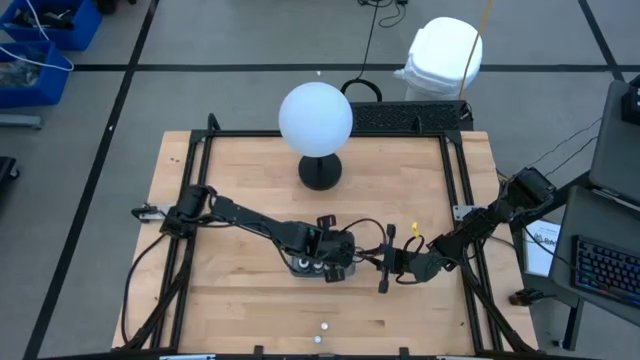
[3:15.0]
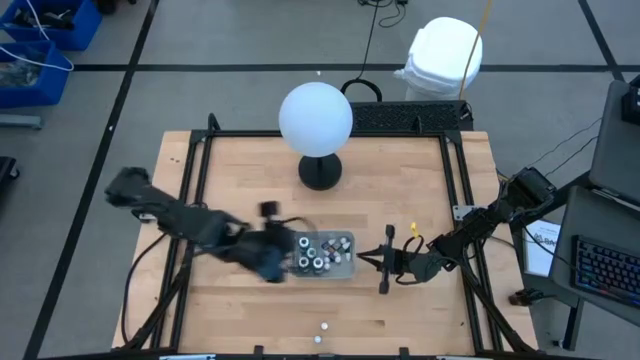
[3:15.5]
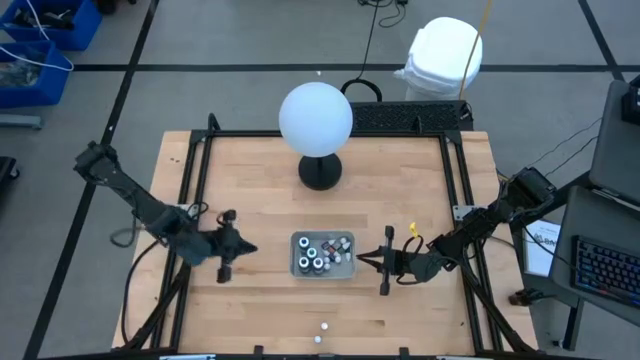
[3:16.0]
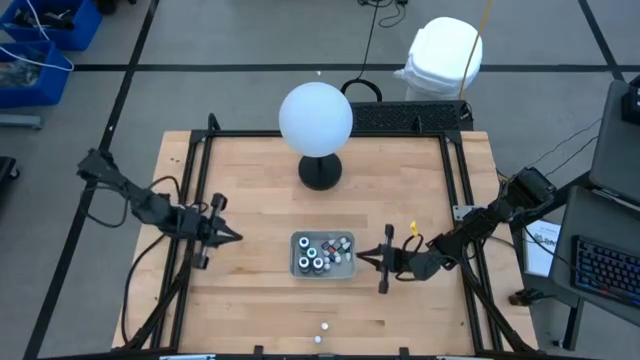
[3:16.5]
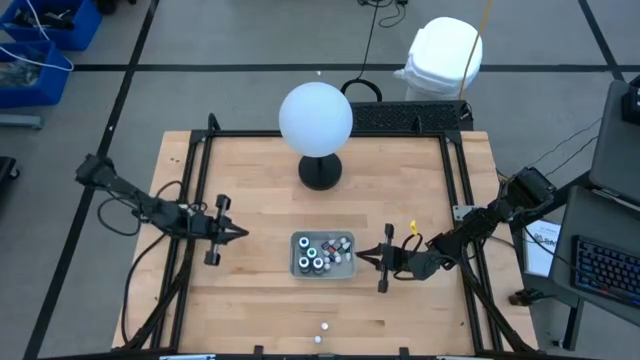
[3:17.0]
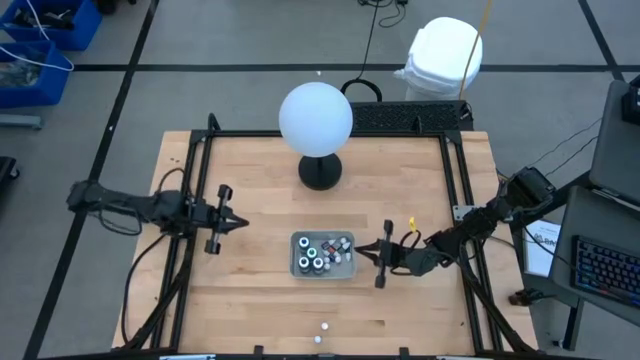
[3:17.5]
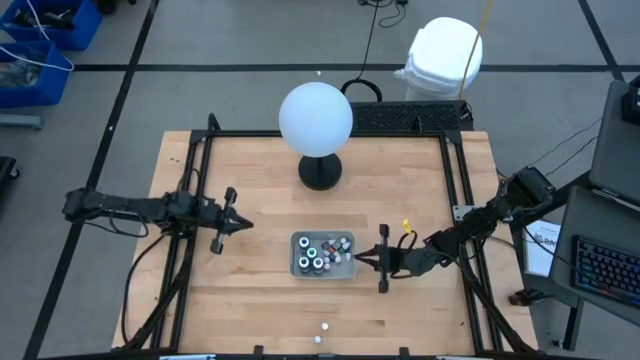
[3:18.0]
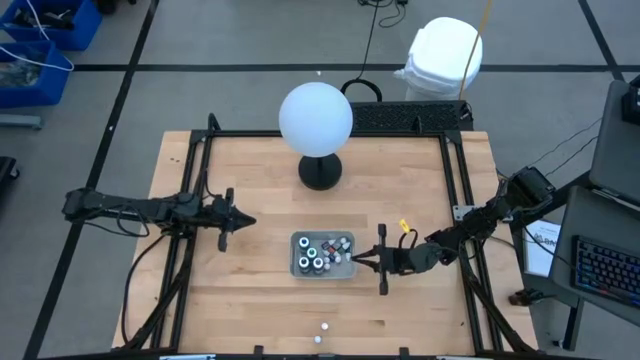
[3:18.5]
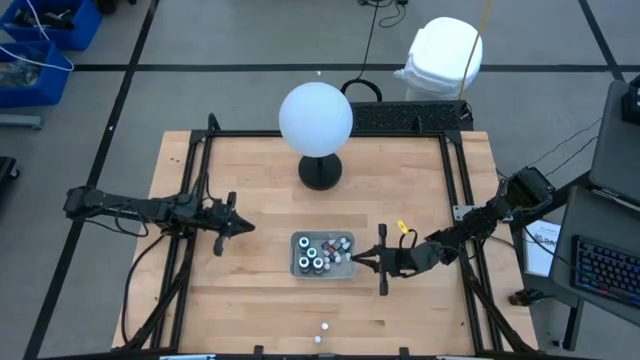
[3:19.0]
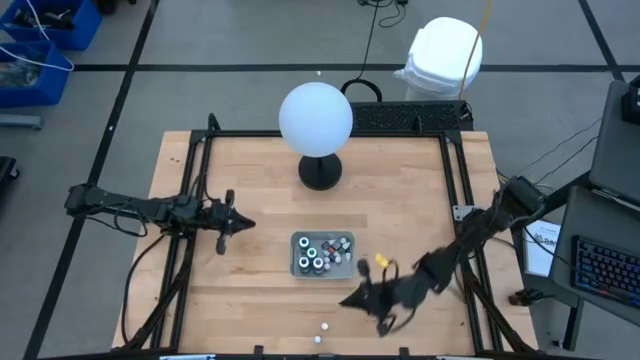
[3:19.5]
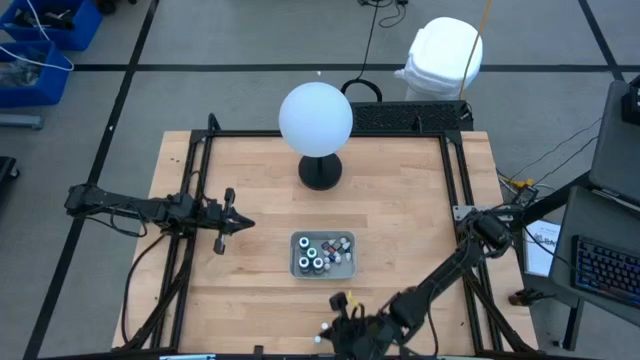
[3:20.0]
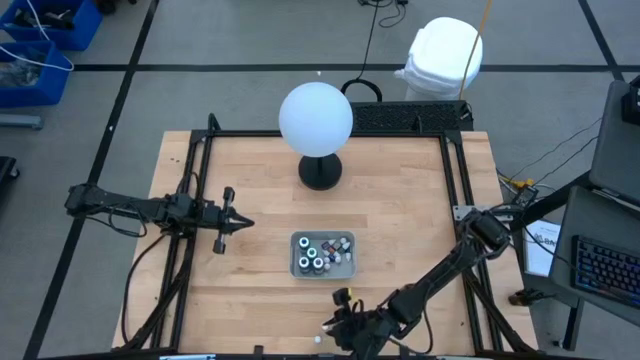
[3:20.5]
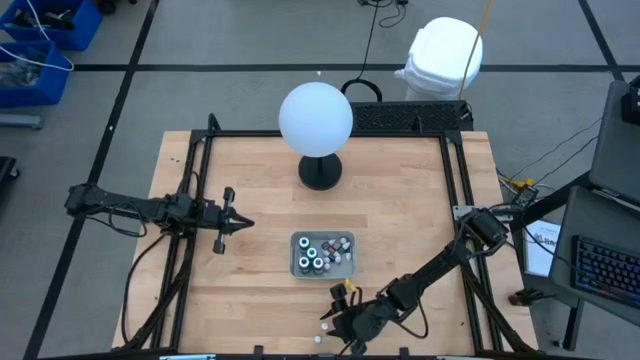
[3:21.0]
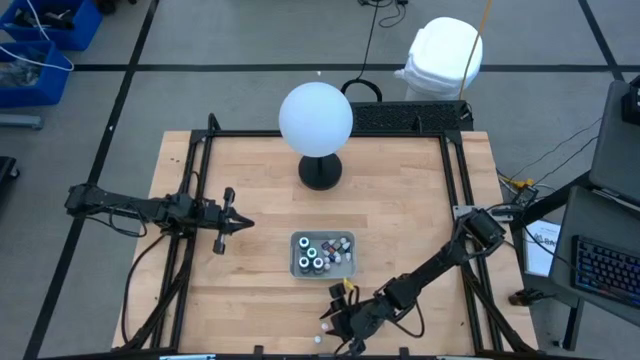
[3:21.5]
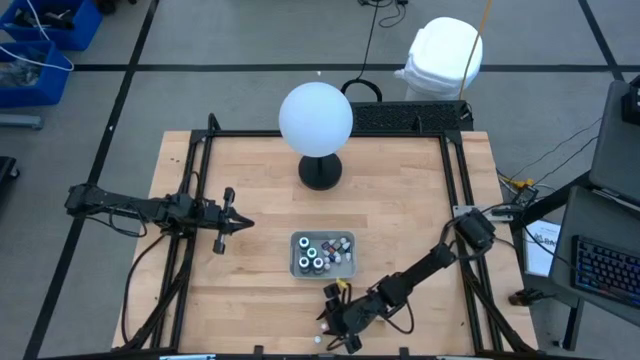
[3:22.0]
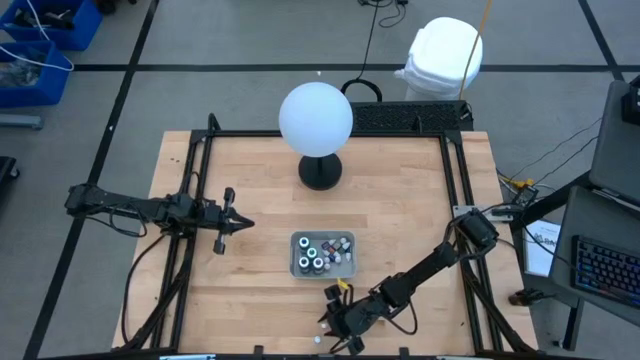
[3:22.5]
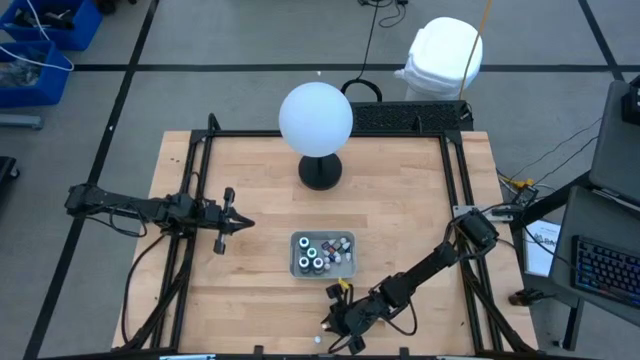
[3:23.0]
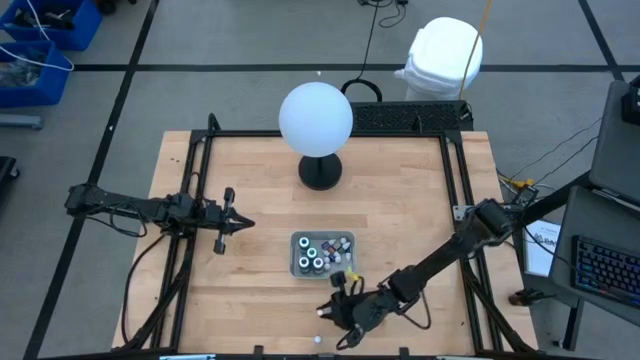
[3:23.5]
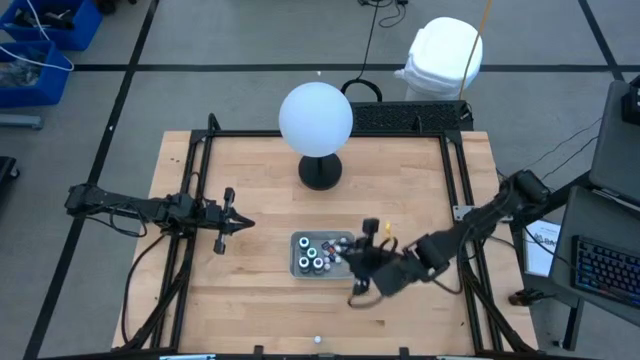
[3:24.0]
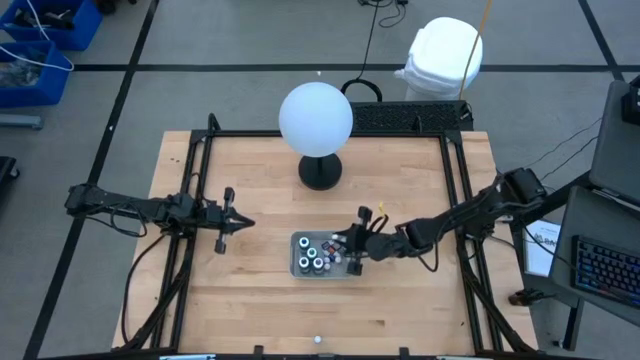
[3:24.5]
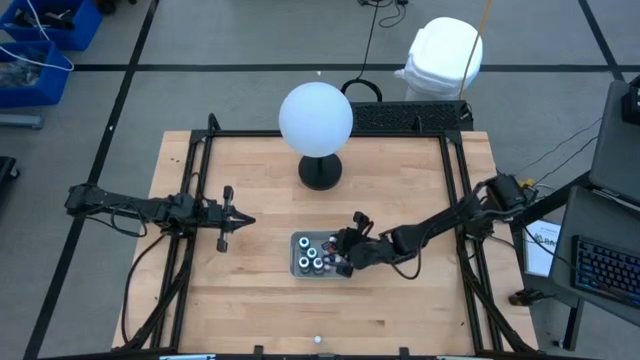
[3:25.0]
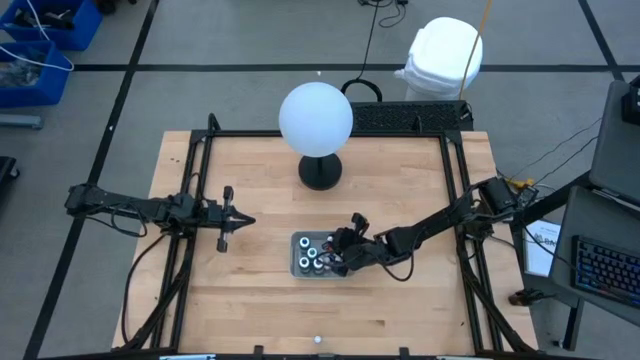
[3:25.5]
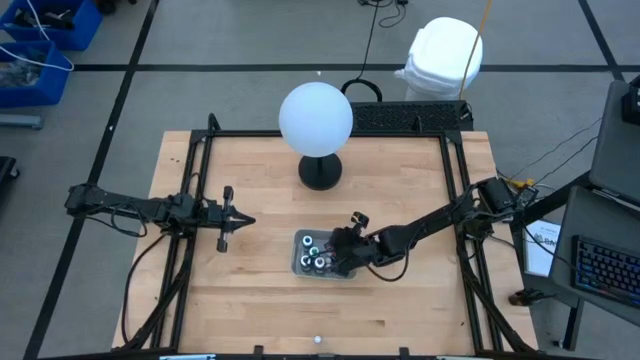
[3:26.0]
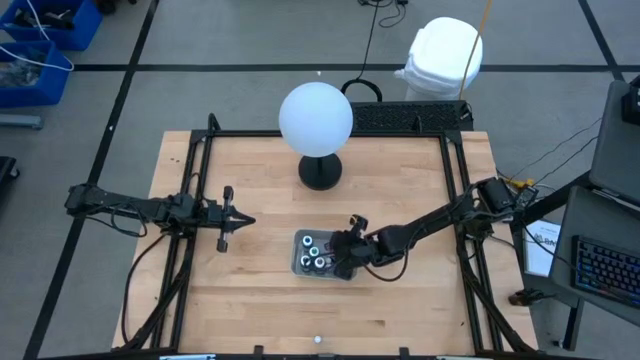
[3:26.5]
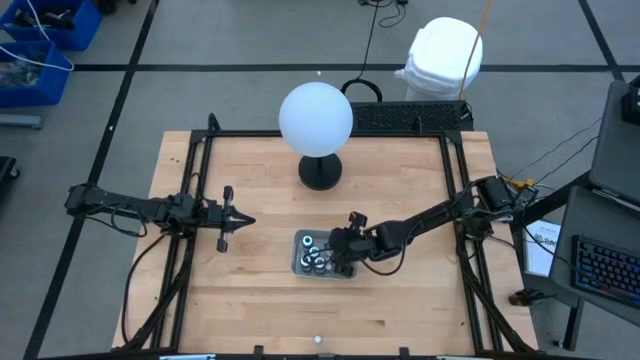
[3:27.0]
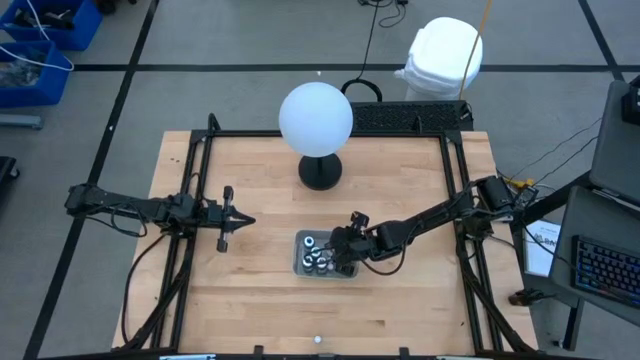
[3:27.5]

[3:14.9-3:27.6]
Task: Pick & Place food coloring
Put the small orange food coloring bottle into the gray bin

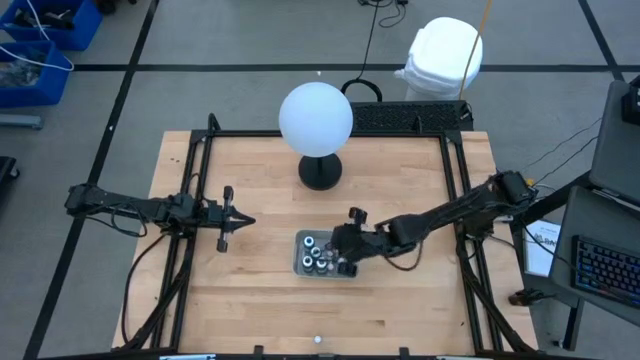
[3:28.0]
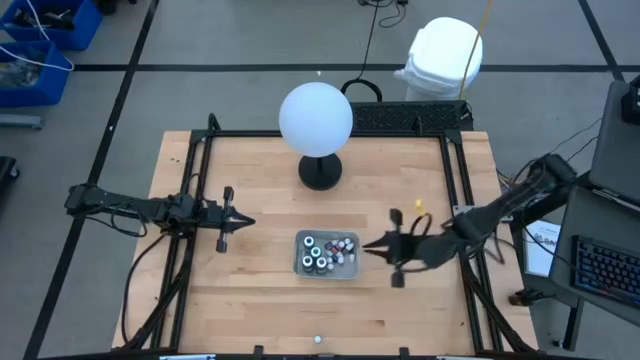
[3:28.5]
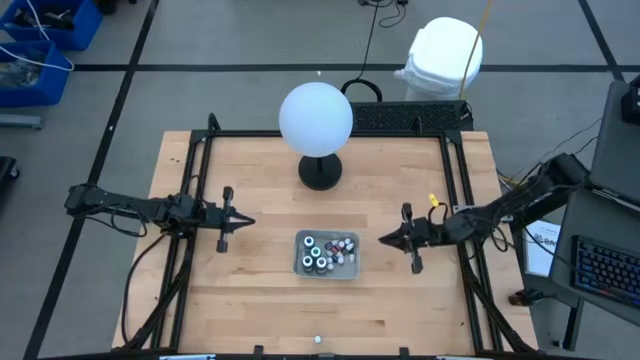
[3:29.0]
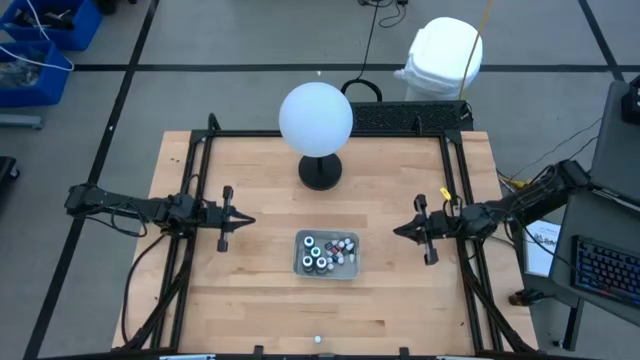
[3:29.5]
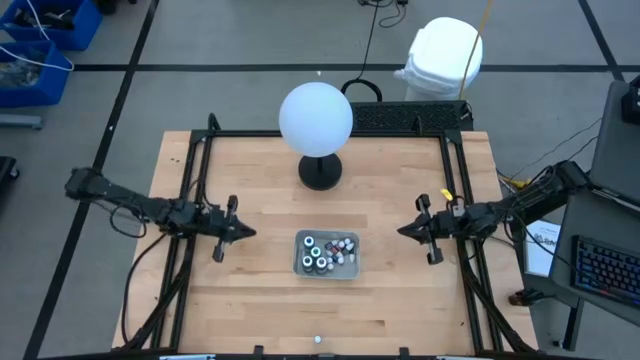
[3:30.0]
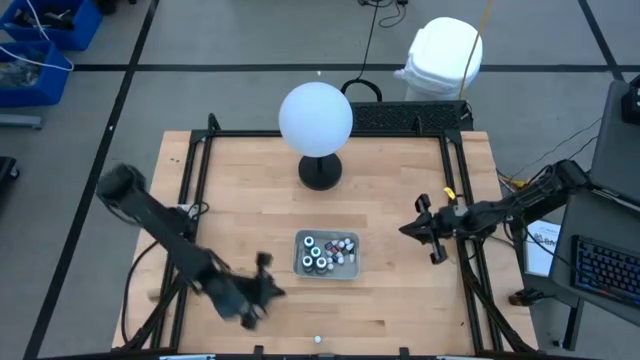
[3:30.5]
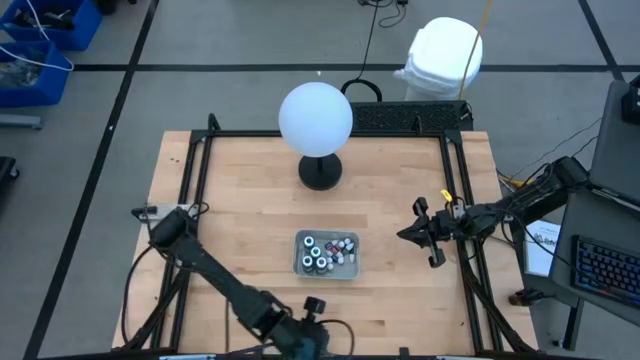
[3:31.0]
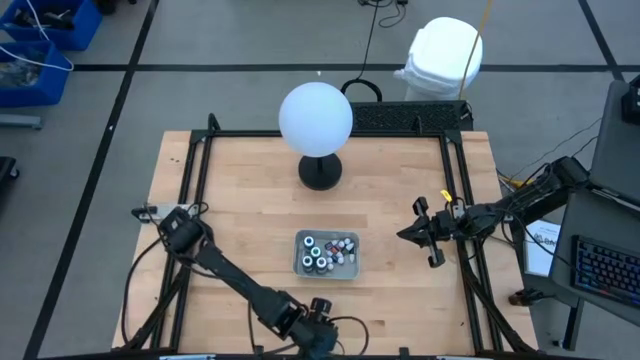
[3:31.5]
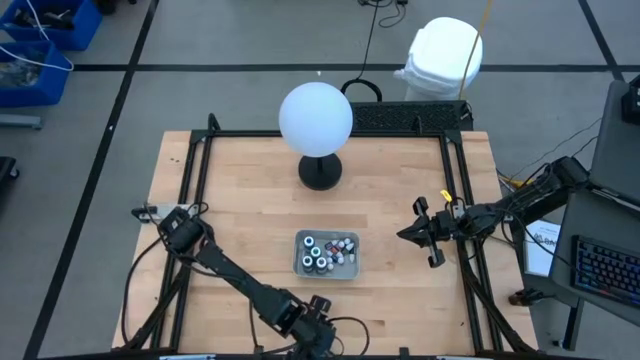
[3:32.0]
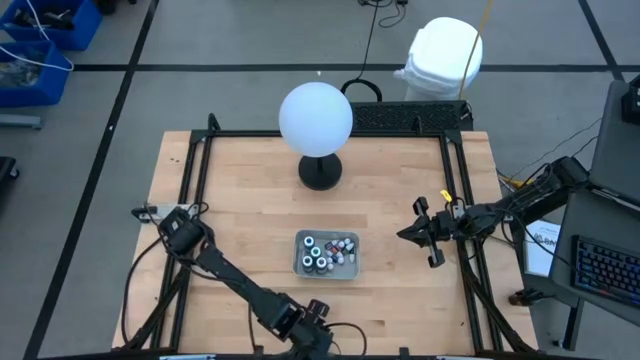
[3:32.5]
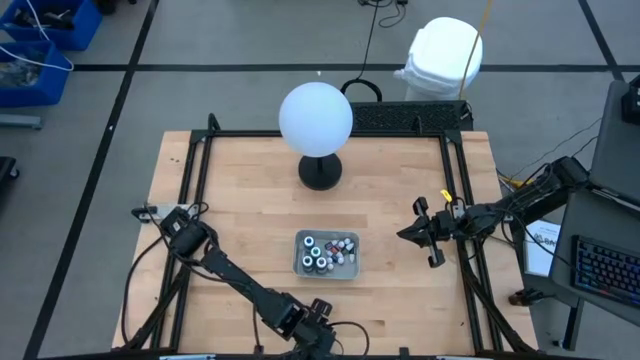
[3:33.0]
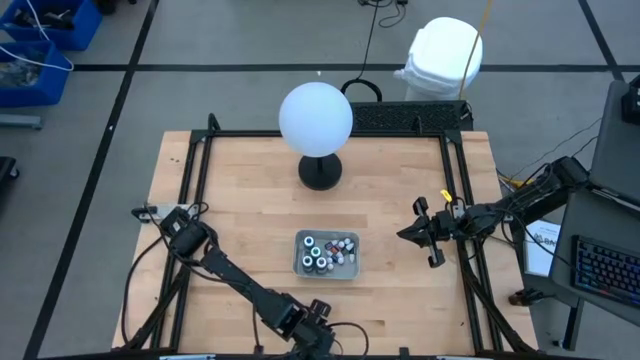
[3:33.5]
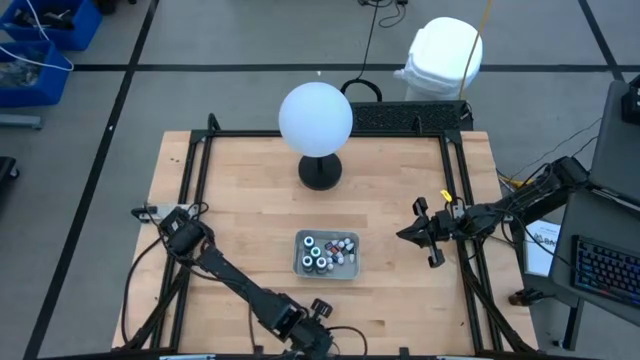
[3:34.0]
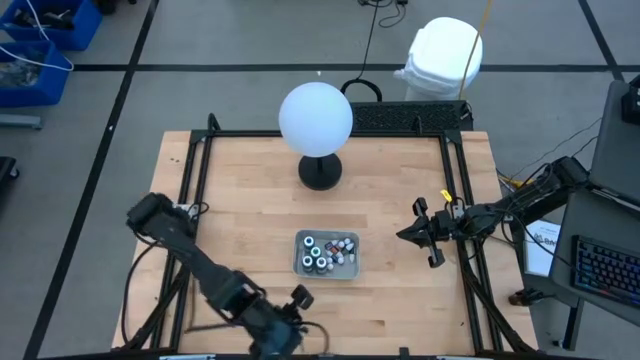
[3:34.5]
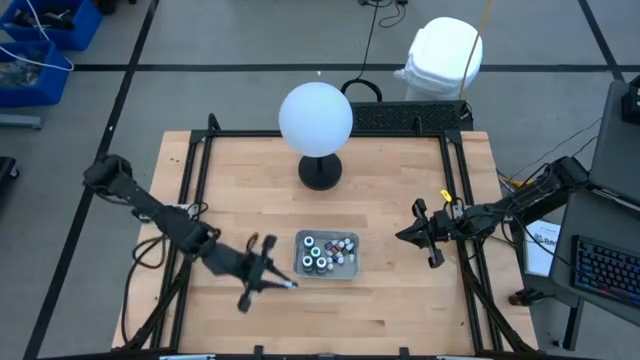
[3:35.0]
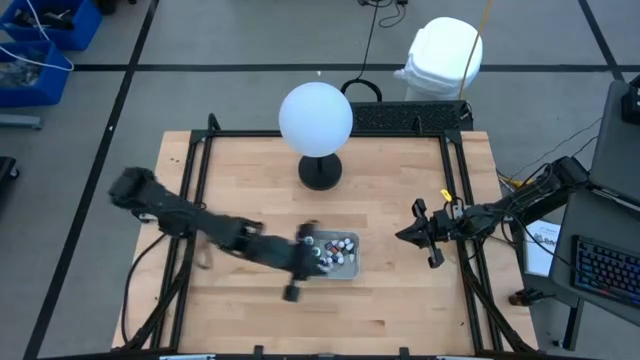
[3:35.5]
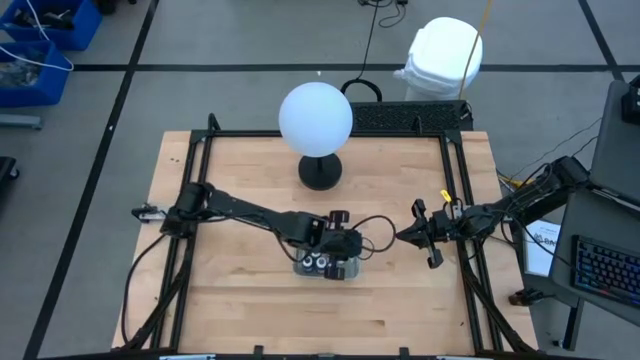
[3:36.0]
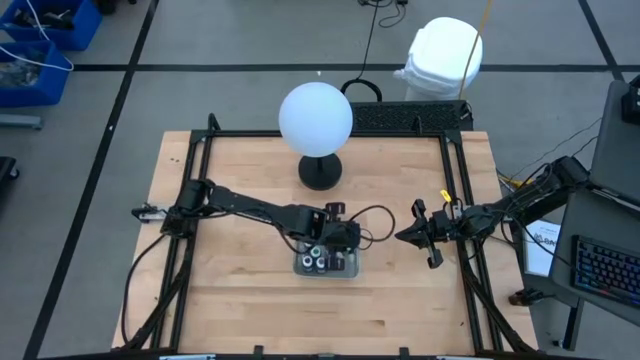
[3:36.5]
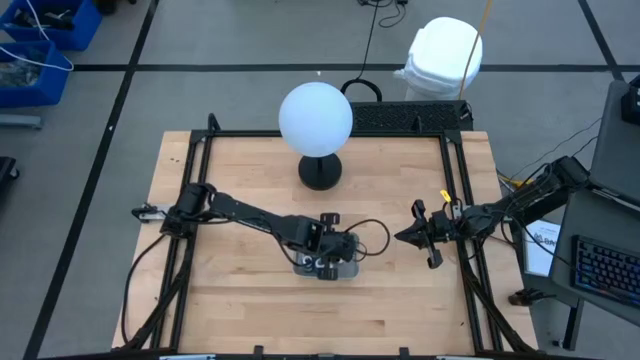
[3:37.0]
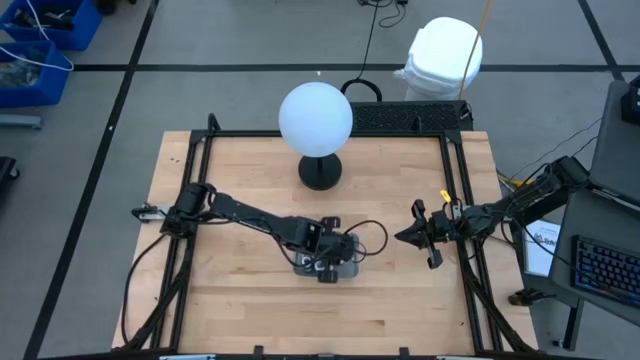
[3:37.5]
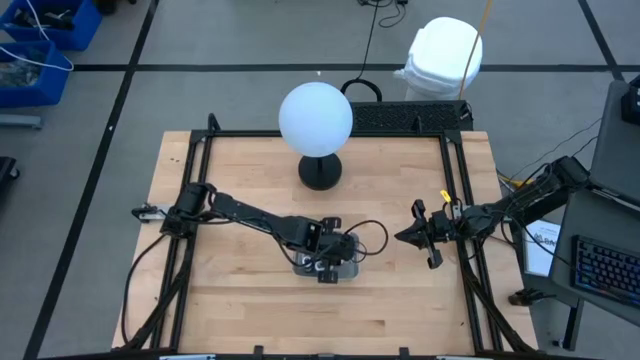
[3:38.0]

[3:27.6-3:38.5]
Put the small black food coloring bottle into the gray bin
